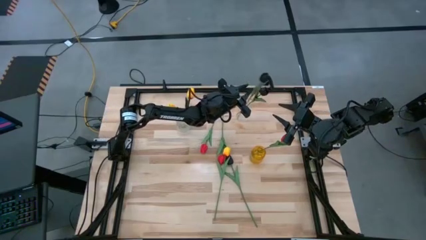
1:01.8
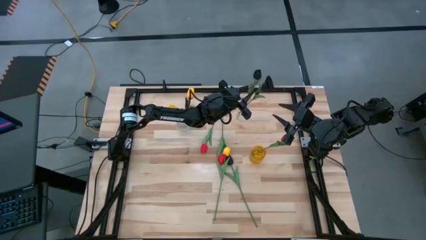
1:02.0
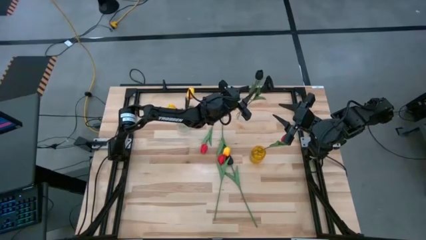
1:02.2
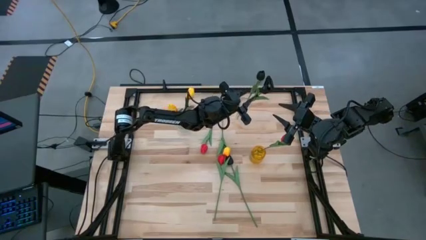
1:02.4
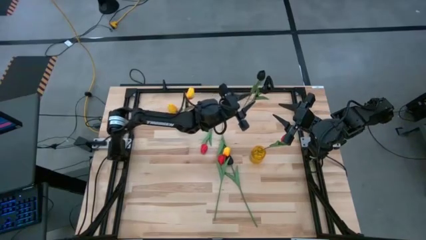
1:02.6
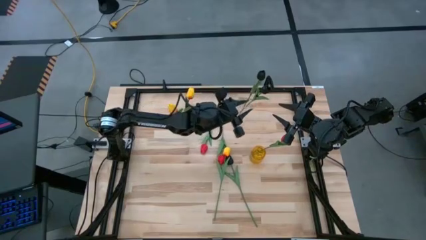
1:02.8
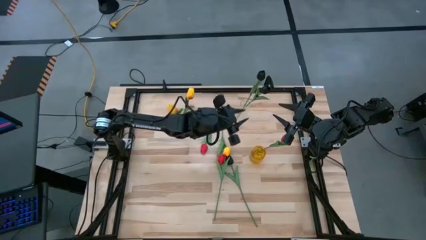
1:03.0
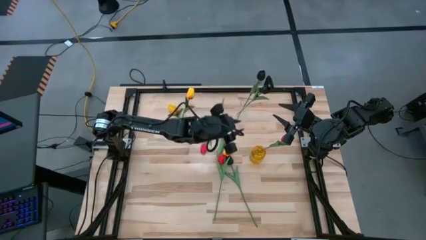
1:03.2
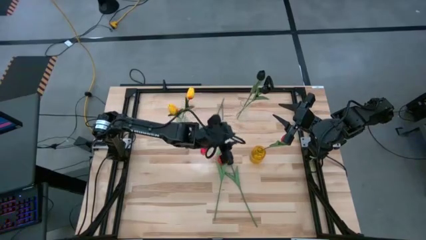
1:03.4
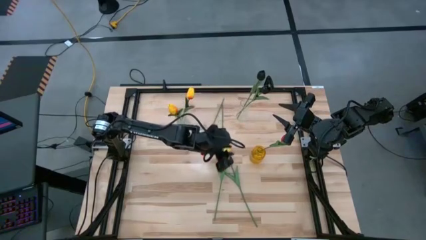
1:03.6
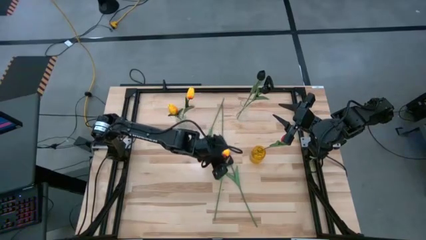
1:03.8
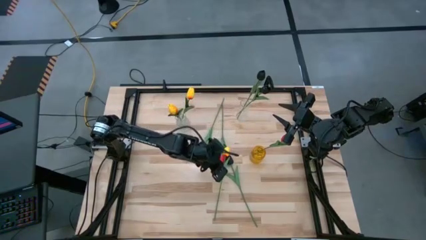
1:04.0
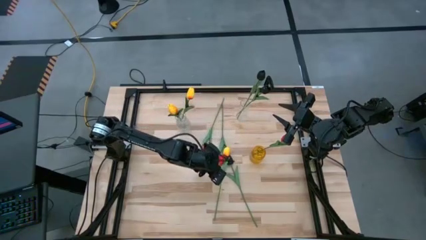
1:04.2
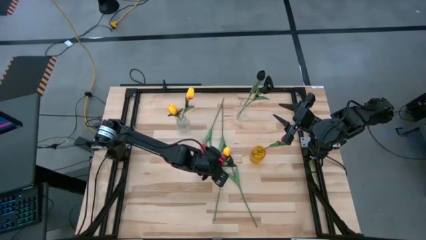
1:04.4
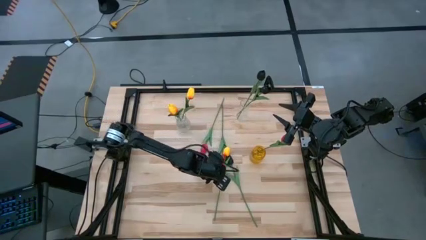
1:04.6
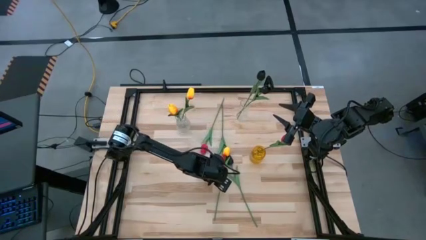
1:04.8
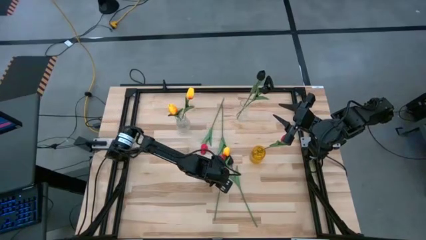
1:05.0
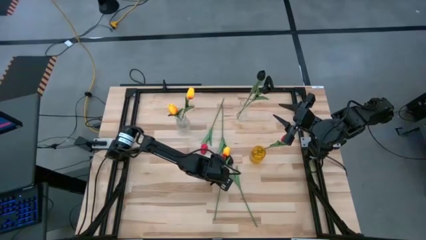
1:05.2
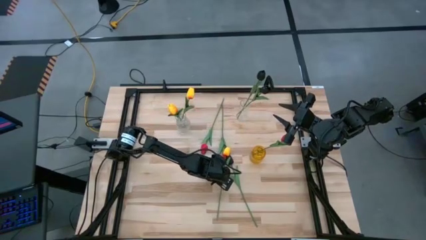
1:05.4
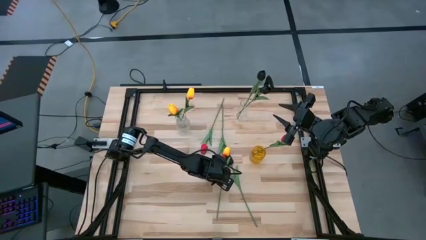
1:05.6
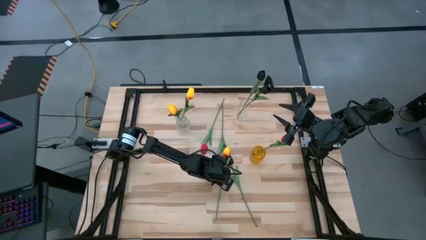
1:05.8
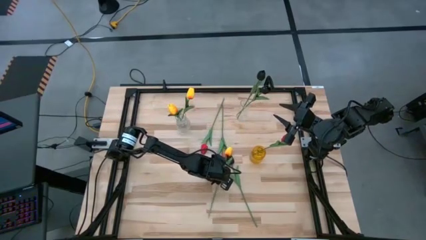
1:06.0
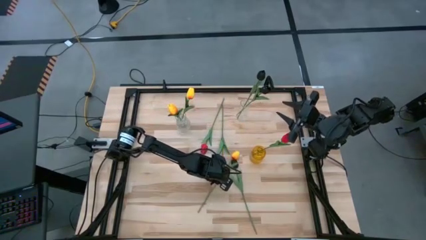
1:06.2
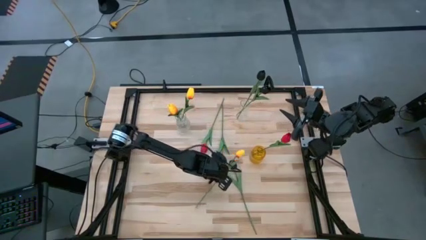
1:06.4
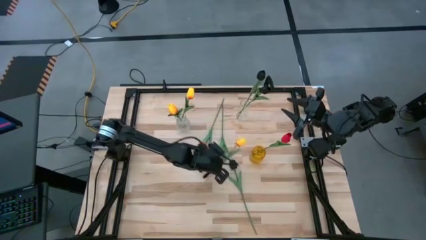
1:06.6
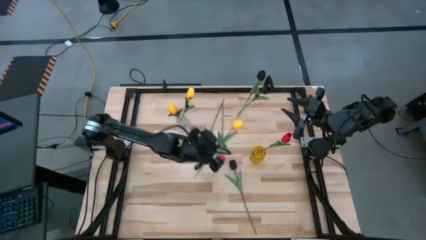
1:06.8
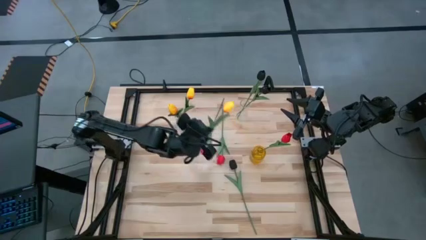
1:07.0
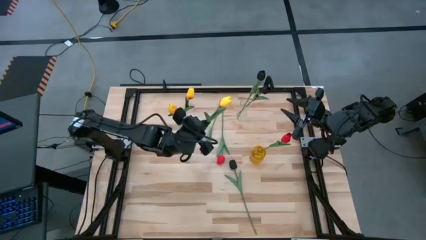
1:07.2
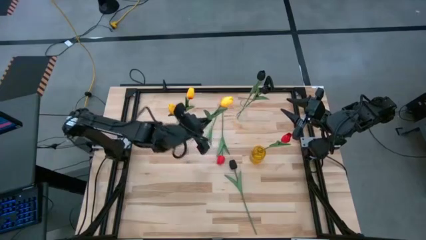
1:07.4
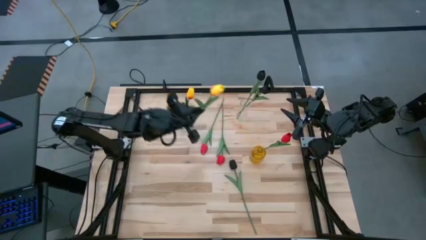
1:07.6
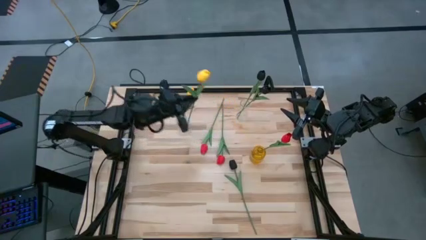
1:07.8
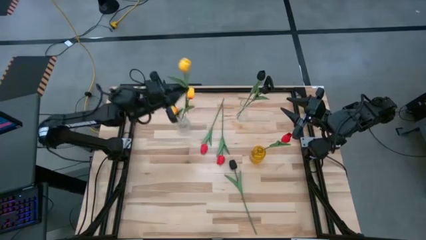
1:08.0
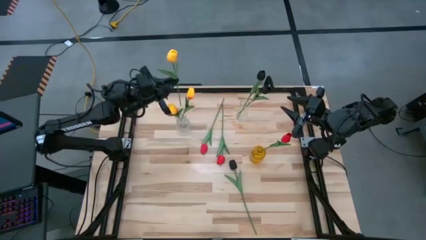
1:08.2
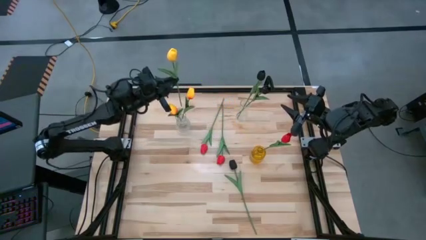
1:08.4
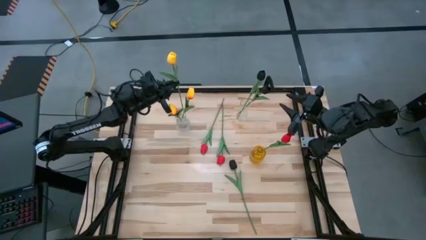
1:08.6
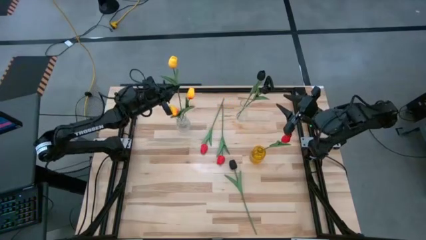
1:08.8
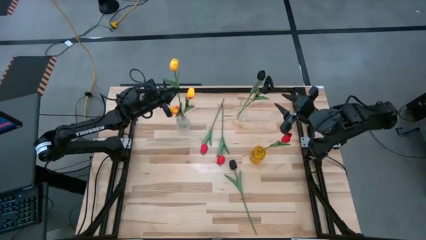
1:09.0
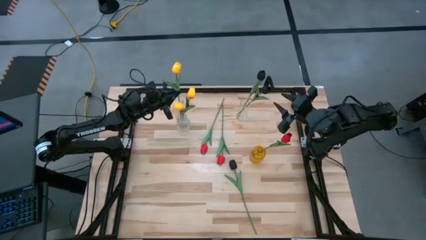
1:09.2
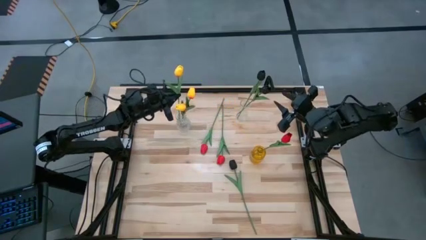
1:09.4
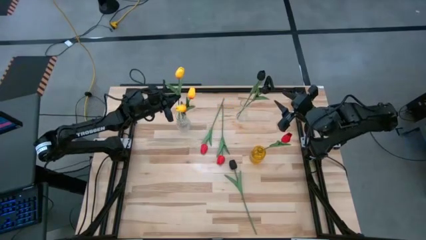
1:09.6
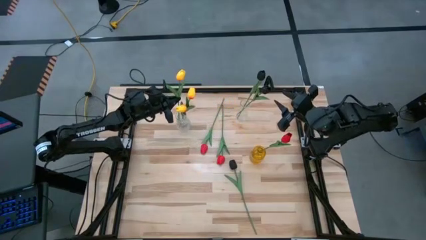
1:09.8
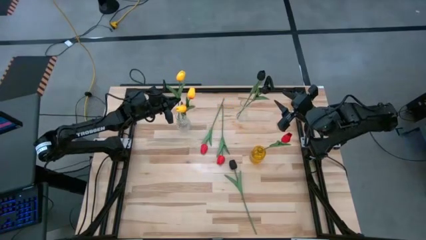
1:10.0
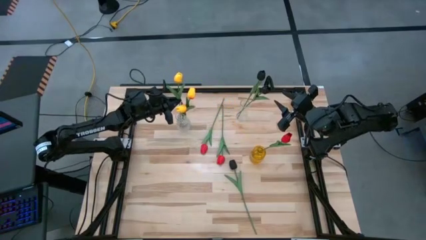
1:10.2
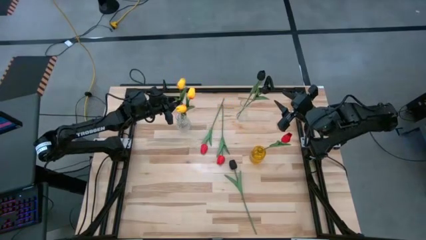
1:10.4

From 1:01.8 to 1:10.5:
Task: Sort flowers into vase by color
Put the yellow tulip into the left transparent vase

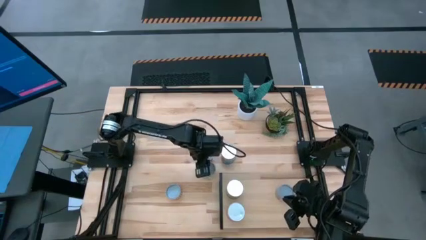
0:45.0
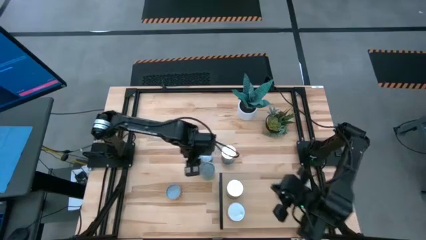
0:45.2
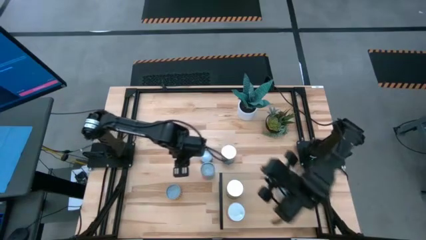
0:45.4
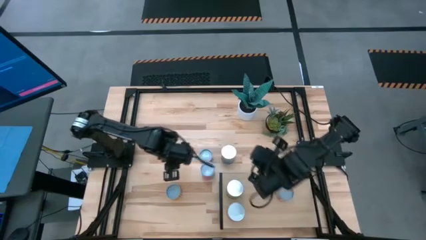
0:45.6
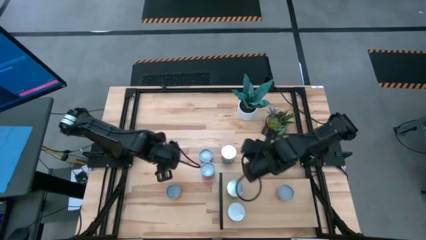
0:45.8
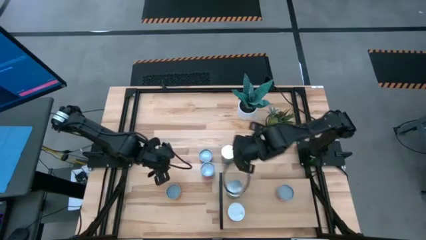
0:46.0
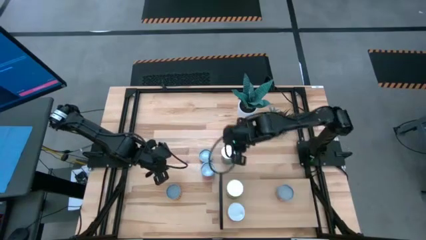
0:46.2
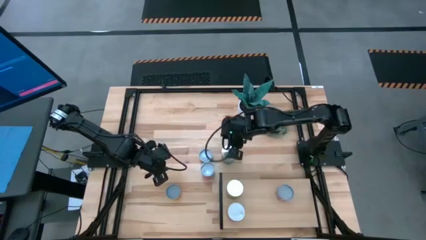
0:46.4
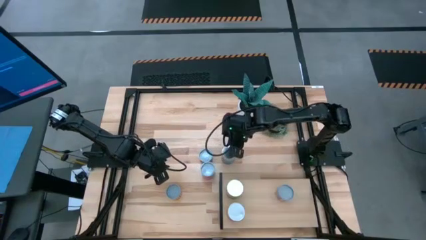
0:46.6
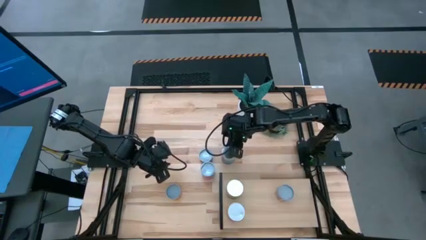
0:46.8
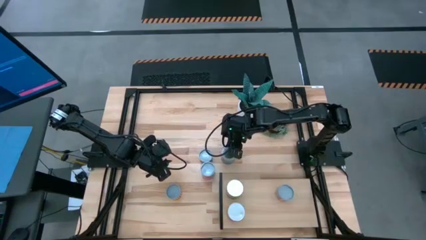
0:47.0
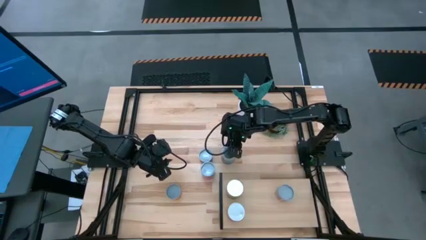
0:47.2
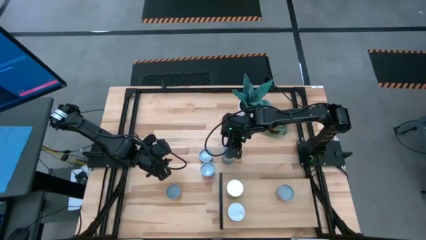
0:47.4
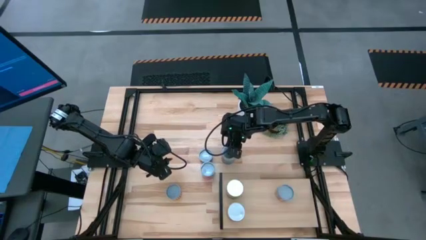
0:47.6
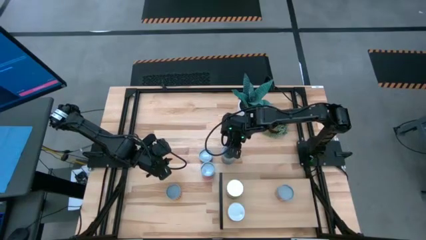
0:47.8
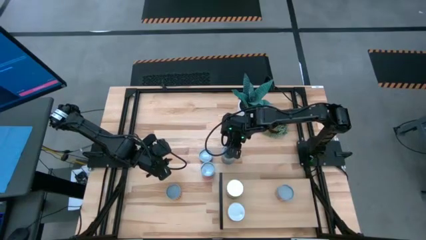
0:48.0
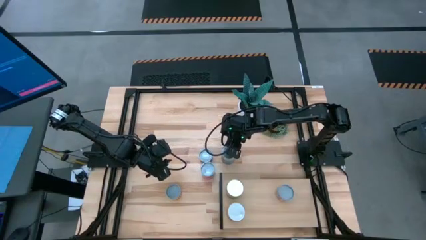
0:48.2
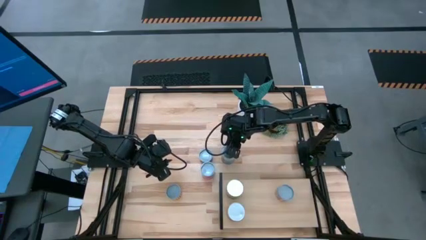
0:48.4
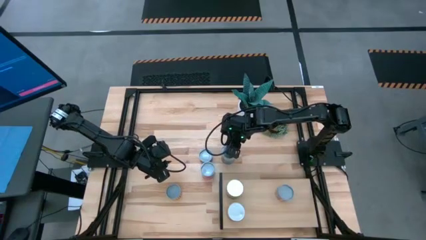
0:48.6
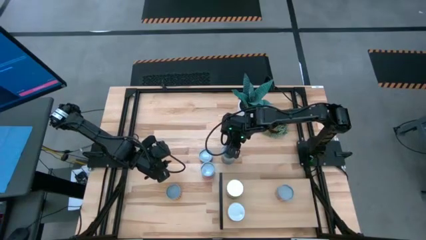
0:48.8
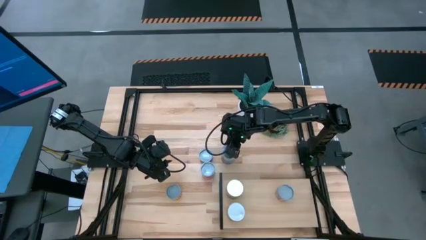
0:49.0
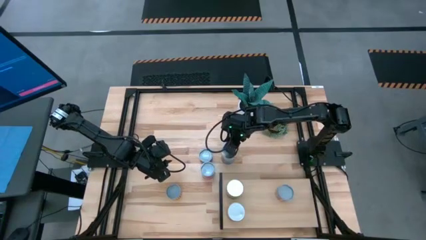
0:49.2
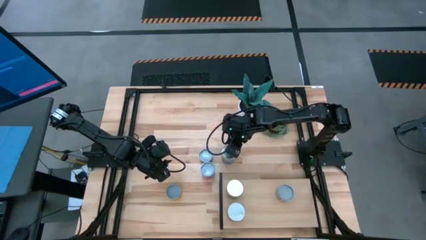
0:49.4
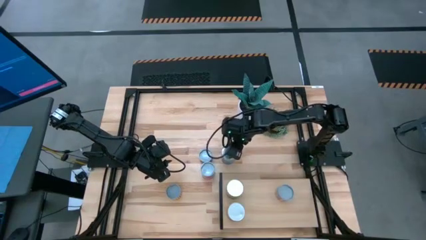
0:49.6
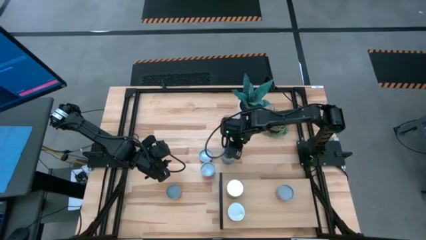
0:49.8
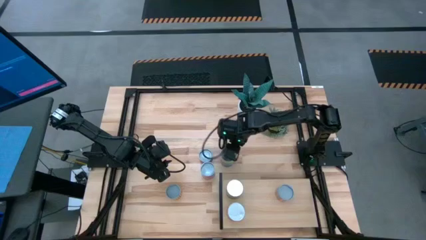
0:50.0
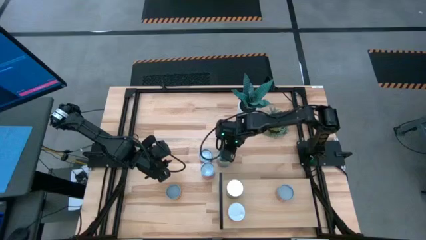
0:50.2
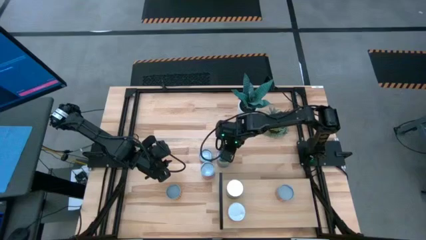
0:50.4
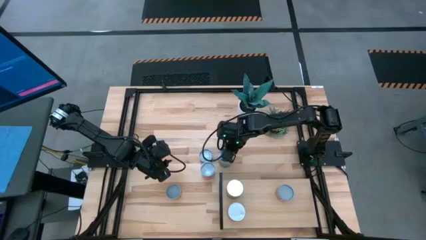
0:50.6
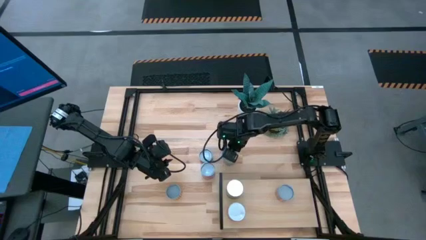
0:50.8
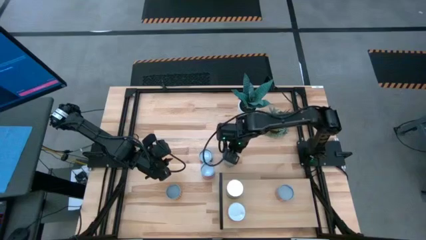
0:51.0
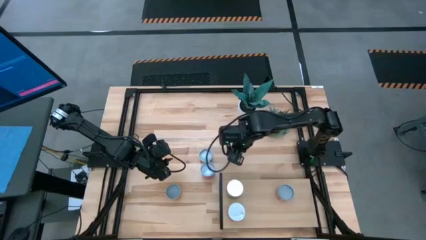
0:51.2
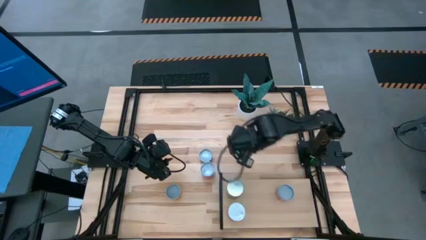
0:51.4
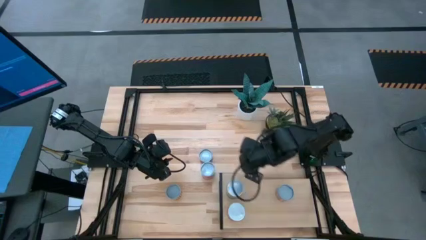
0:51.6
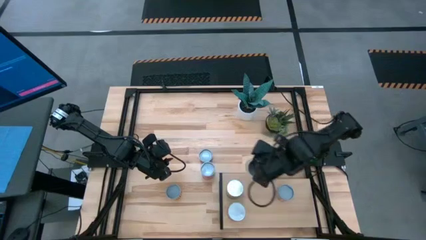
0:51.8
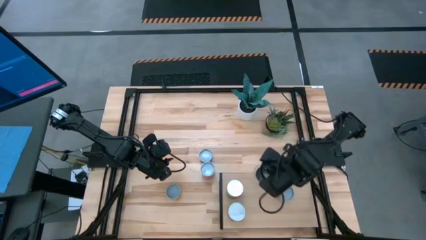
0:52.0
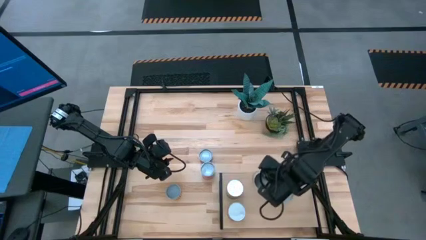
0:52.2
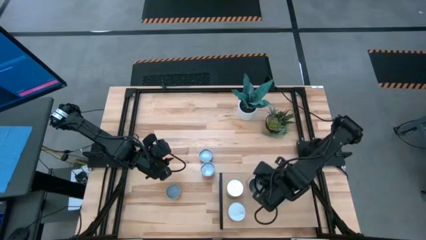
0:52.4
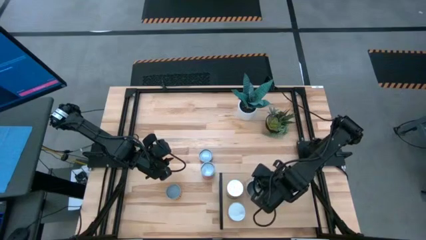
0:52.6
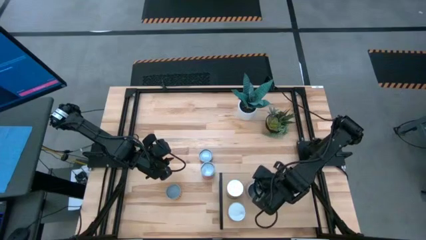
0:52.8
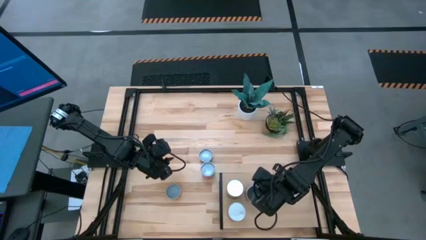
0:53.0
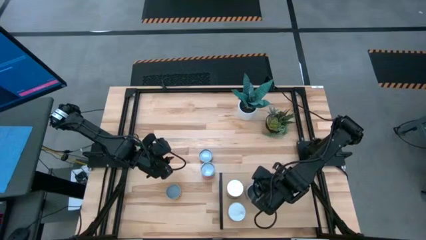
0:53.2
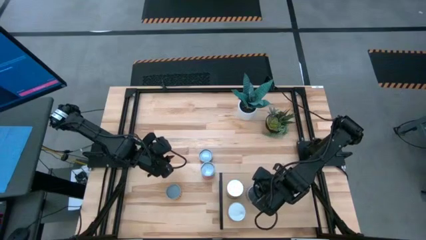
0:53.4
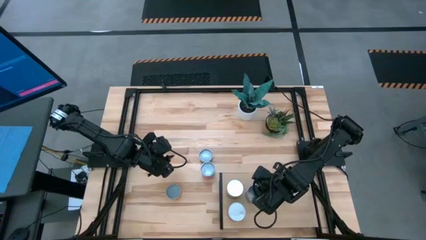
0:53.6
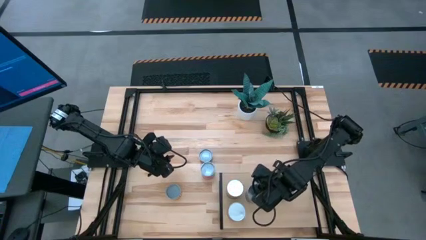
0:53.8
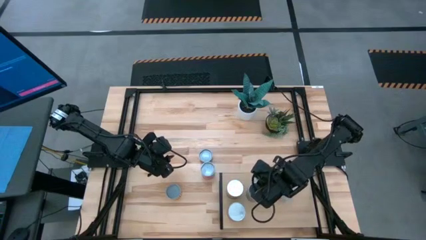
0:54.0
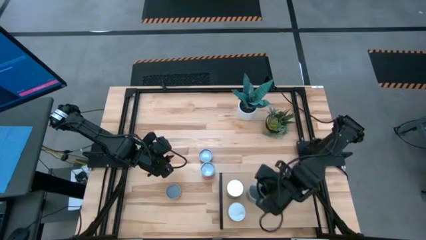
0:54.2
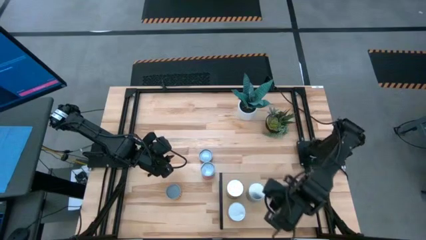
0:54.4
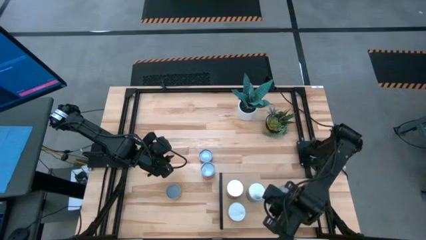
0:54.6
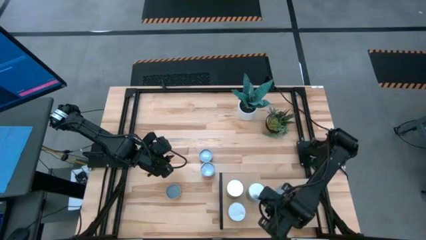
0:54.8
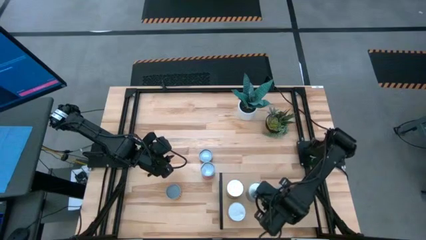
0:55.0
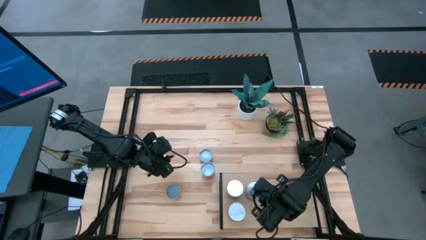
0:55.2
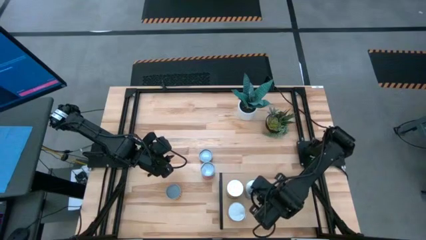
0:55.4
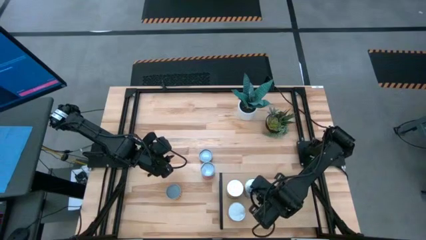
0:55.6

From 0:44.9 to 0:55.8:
Task: Pick and place cans onto a shelf
Put the canned tomatoes on the shelf
